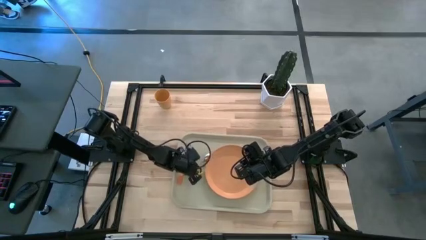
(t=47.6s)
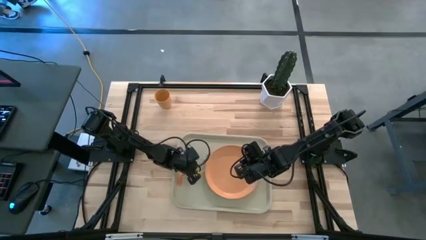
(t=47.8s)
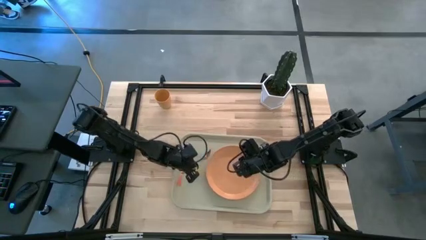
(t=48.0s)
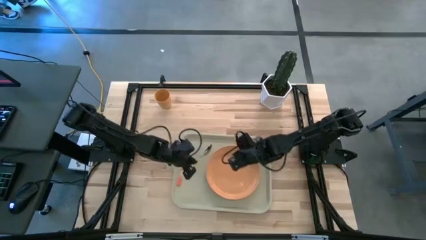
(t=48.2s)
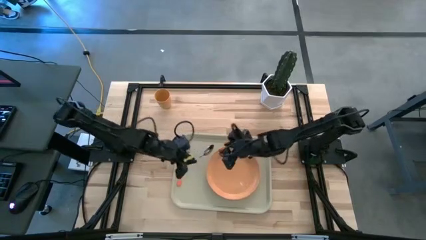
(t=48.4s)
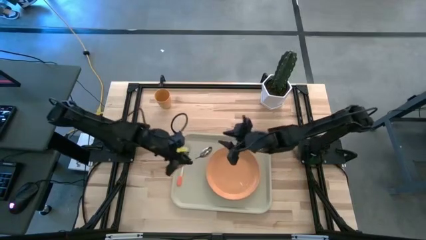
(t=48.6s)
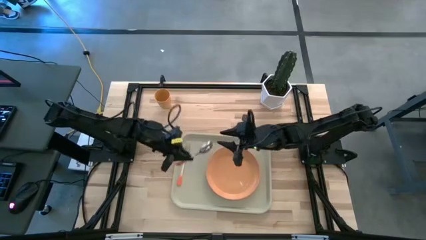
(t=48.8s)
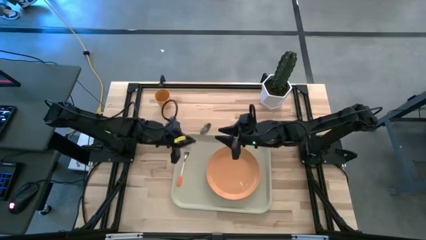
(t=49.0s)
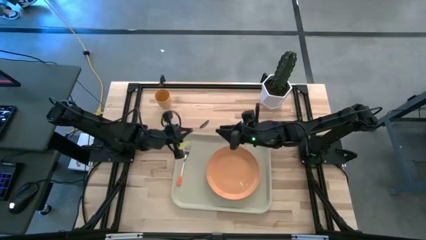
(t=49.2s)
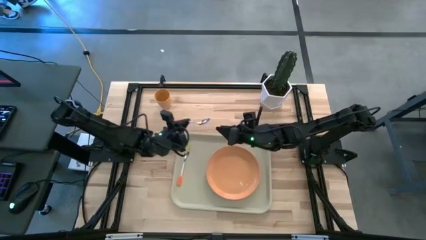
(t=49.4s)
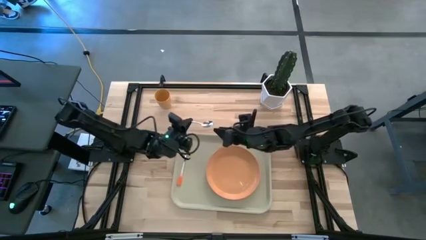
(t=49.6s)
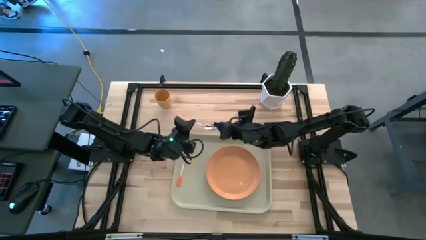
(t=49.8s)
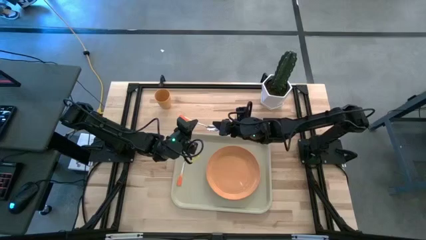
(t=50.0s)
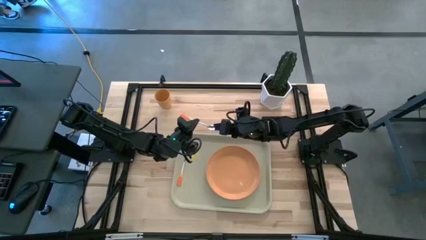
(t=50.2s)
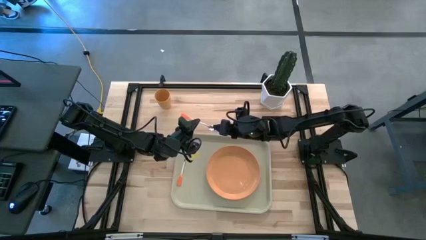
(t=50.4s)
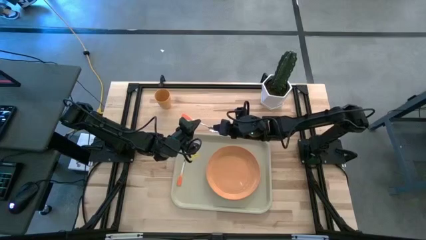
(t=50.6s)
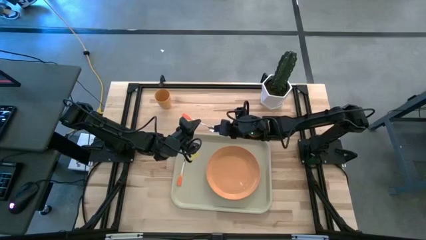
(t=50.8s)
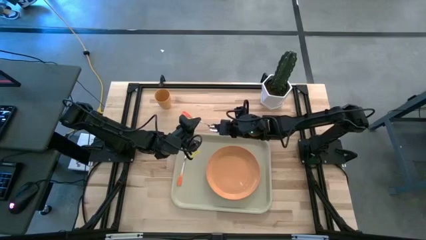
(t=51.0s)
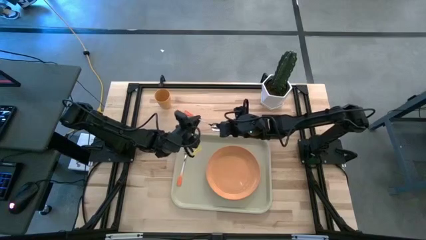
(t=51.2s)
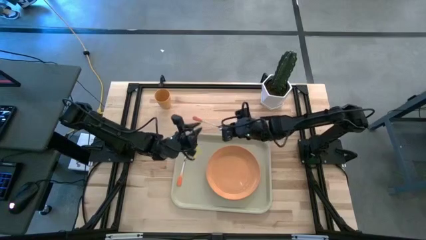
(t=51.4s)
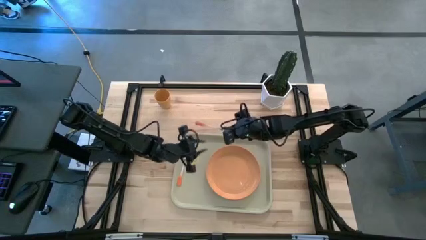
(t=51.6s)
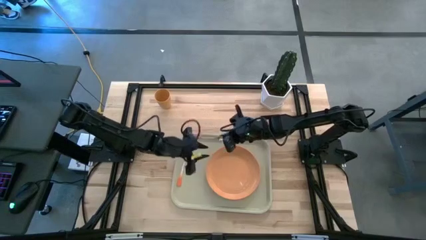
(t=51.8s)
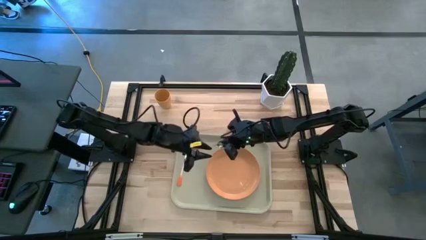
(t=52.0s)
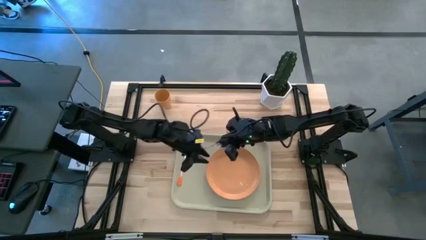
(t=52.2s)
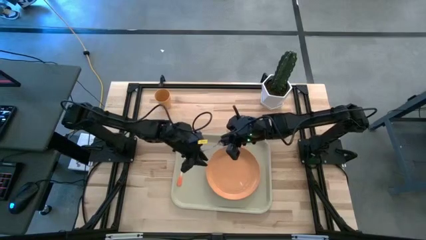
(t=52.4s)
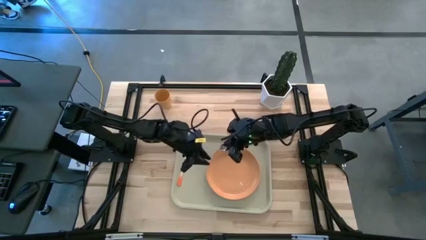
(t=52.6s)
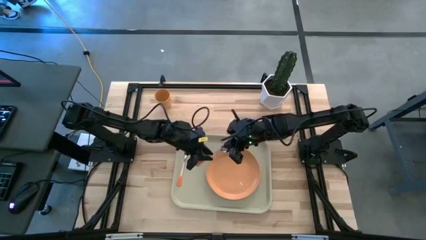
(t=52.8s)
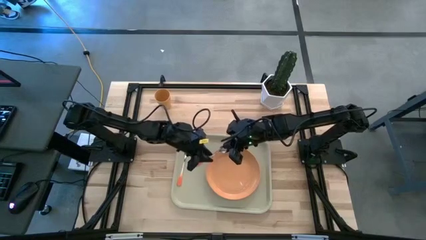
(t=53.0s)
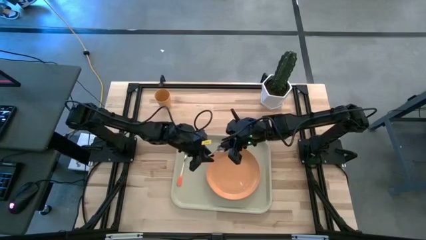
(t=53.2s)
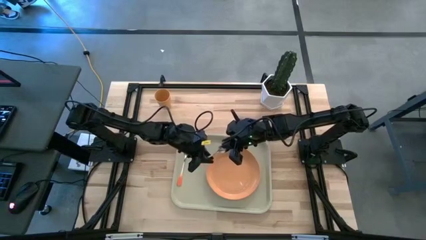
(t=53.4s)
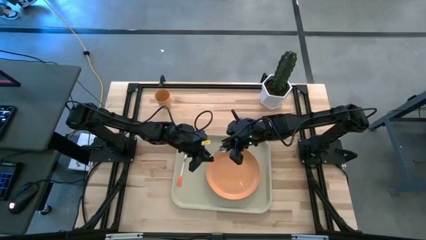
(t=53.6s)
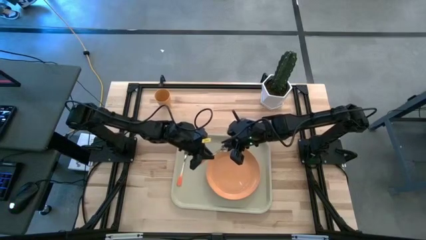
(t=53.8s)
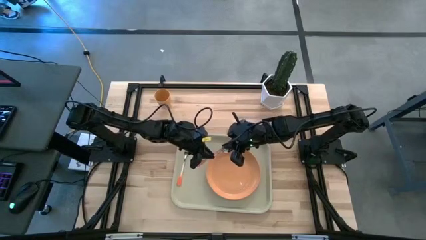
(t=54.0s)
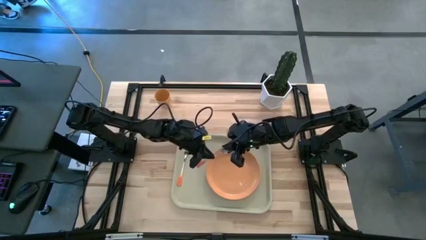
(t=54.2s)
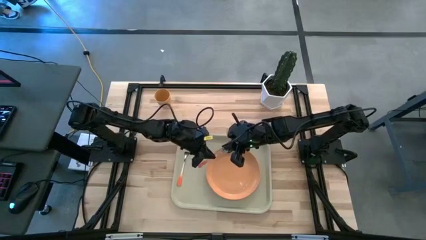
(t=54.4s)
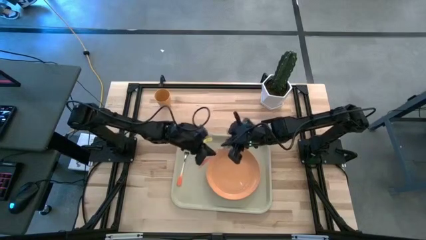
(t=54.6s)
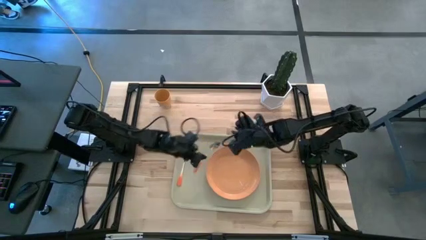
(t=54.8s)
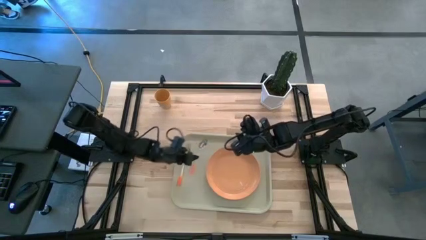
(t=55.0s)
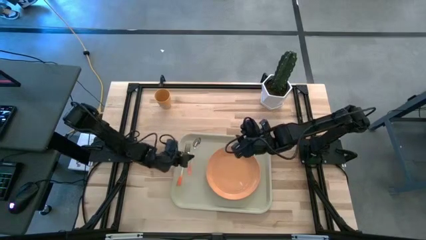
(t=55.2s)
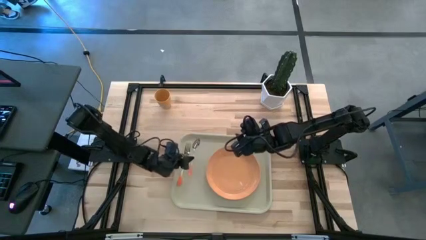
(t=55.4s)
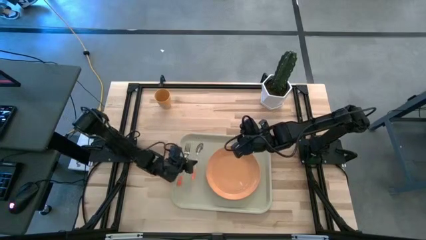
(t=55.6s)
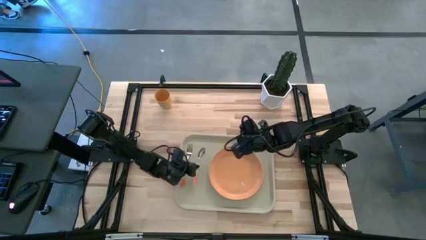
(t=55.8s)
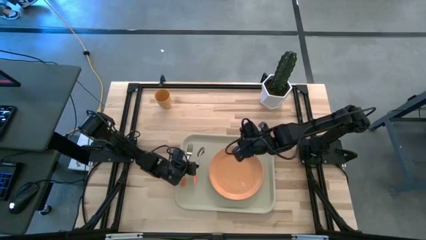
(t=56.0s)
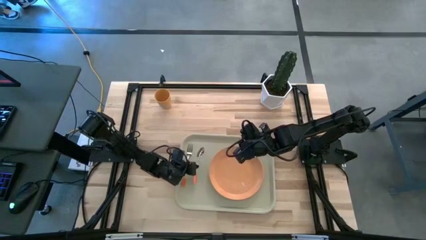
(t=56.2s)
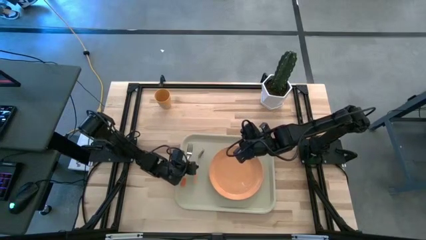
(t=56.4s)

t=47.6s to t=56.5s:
Task: Pick and place plate/cup/fork/spoon on tray
Put the orange spoon on the light brown serving tray to the left side of orange plate

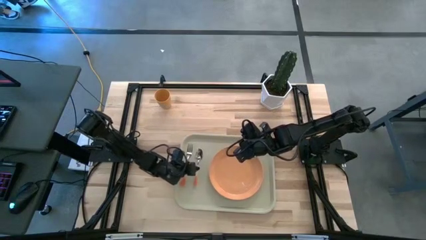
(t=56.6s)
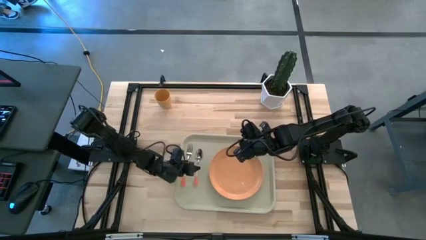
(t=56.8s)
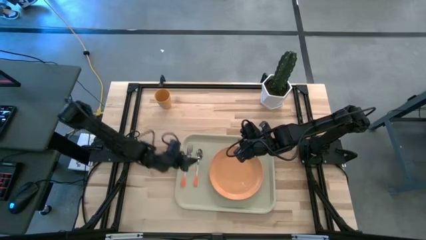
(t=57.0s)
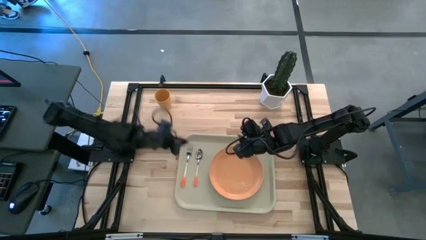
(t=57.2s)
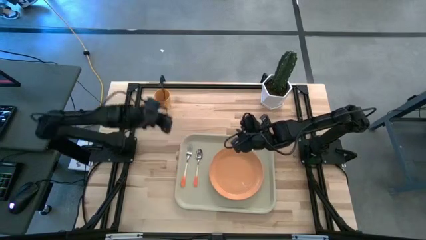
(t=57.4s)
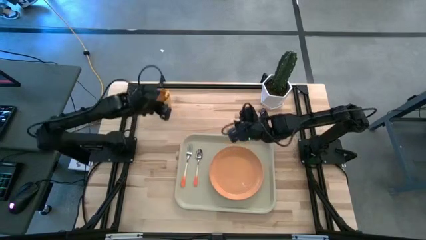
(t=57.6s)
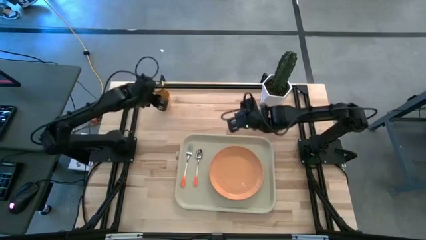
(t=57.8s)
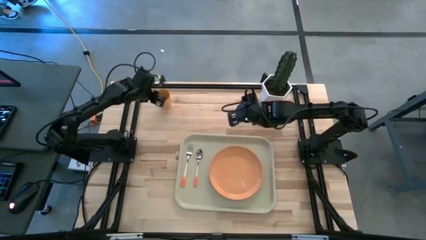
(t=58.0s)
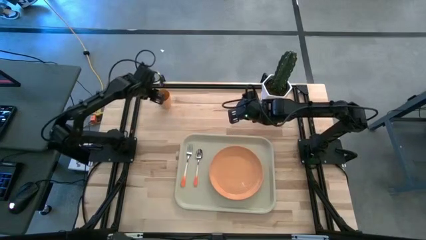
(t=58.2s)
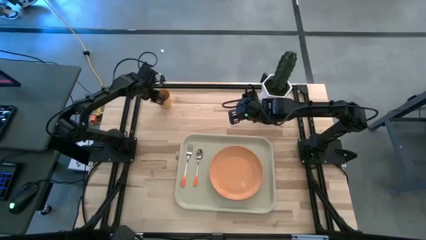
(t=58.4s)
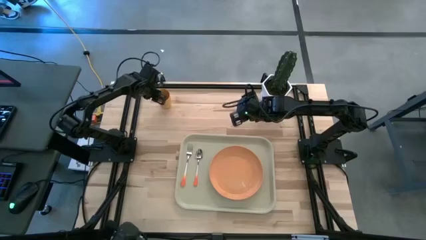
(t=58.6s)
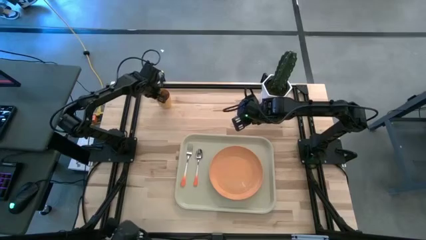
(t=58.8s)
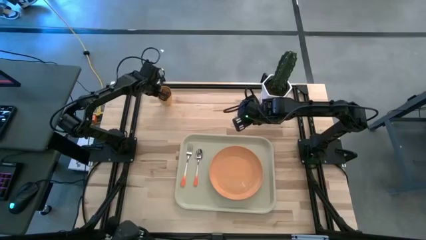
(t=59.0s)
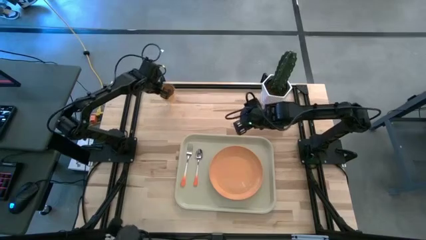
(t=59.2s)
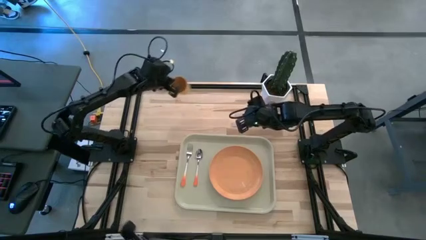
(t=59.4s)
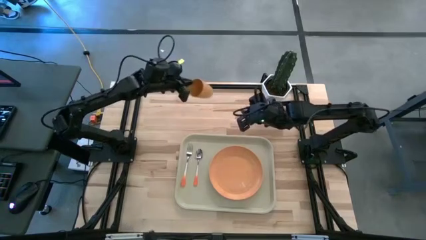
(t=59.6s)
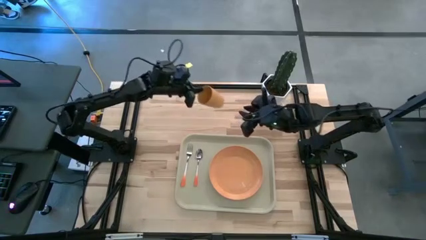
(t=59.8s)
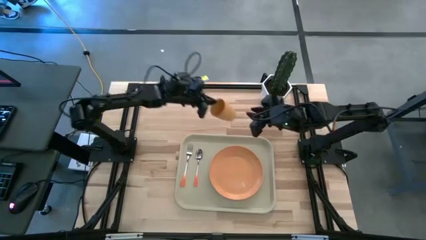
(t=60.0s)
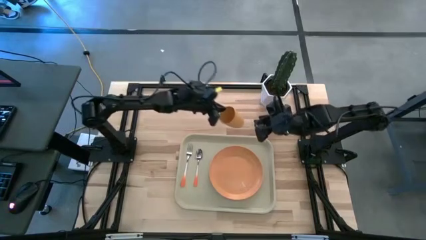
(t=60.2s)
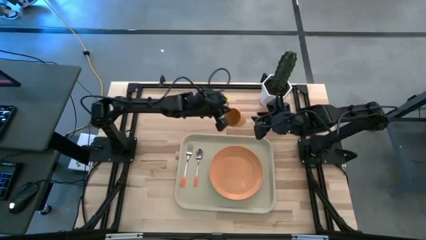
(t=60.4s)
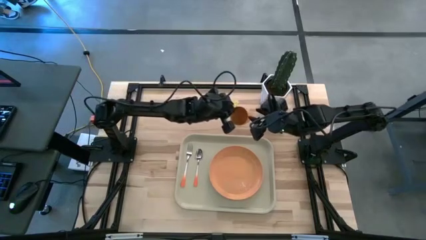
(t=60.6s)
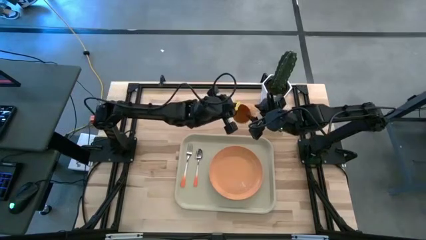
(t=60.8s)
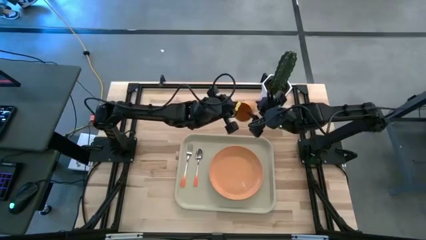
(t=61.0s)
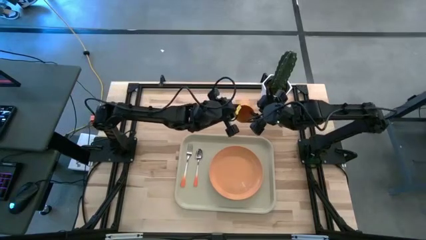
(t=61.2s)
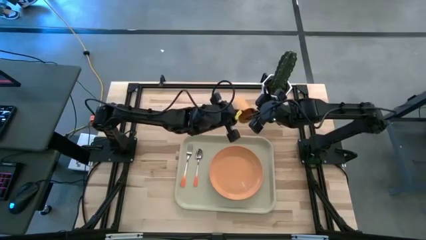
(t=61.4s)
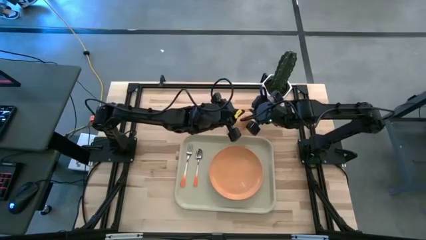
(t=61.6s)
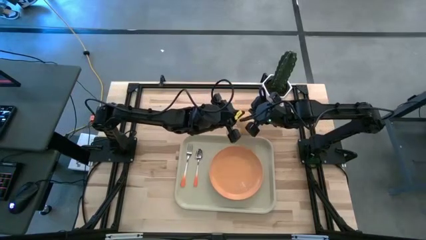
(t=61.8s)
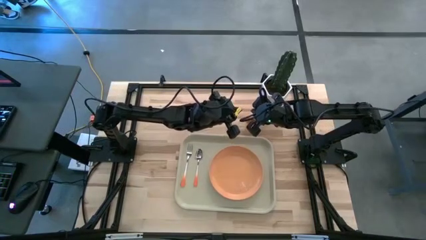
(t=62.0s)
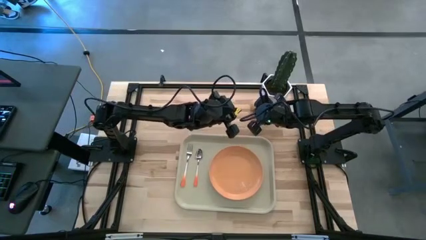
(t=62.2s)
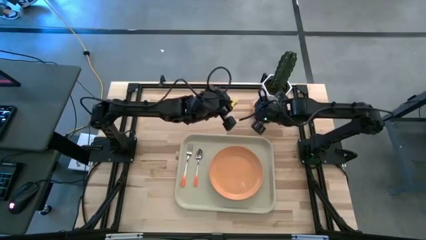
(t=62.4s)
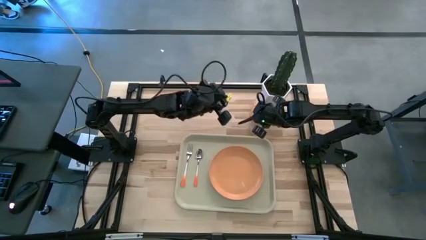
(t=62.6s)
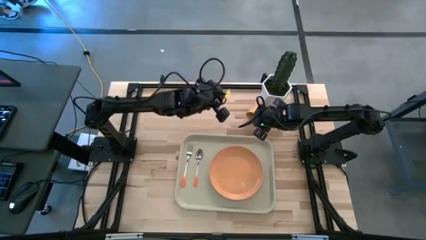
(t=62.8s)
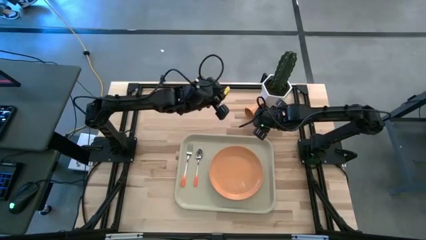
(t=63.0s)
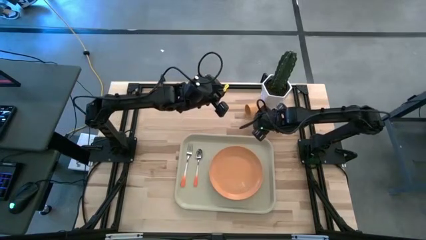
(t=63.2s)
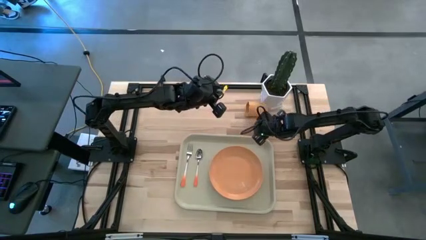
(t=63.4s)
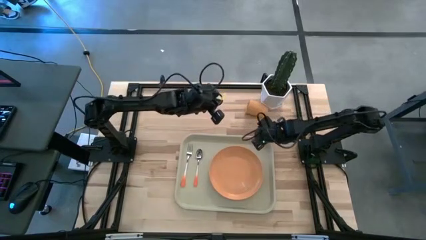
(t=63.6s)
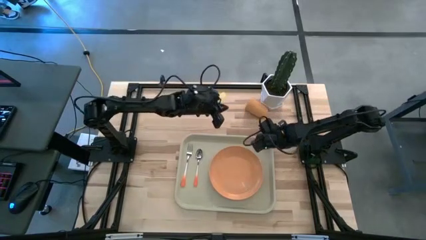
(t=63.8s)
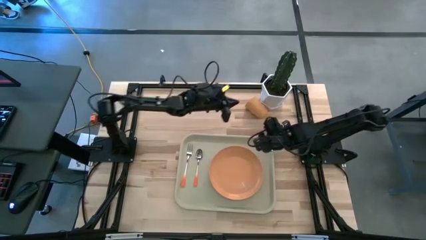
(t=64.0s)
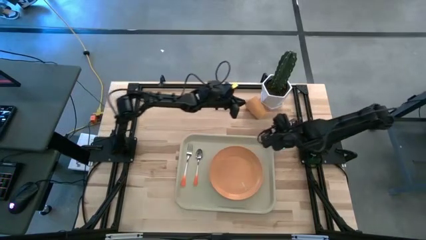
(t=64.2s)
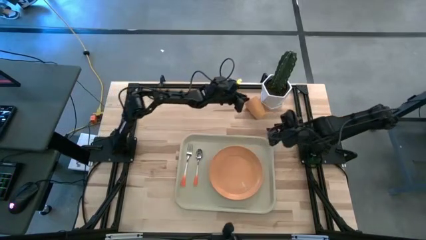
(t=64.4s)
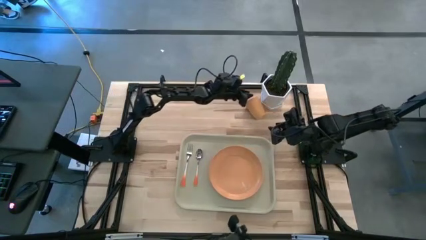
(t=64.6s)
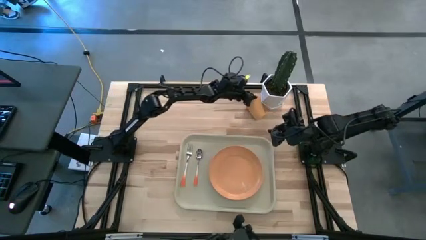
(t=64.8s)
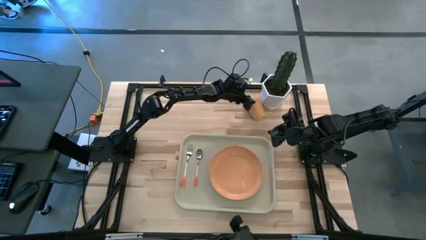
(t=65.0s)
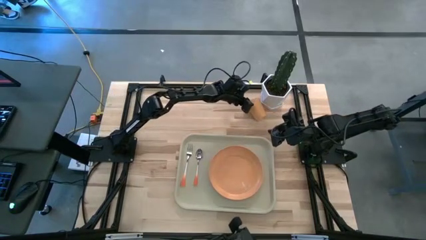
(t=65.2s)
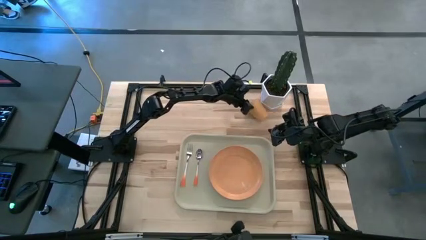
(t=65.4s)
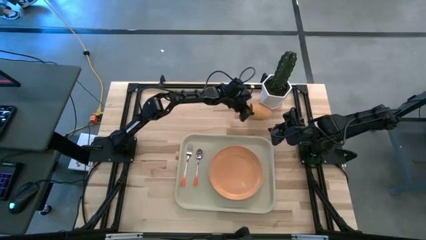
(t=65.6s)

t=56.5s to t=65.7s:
Put the orange cup on the light brown serving tray to the top right of orange plate
